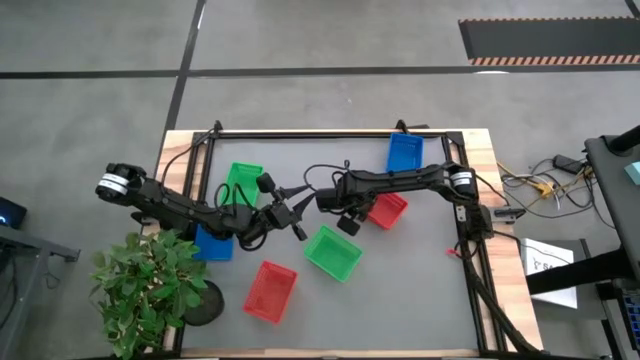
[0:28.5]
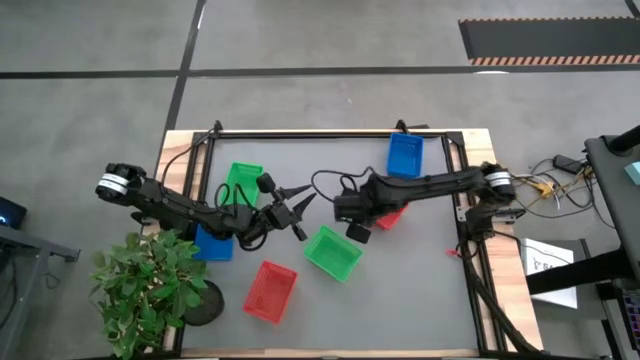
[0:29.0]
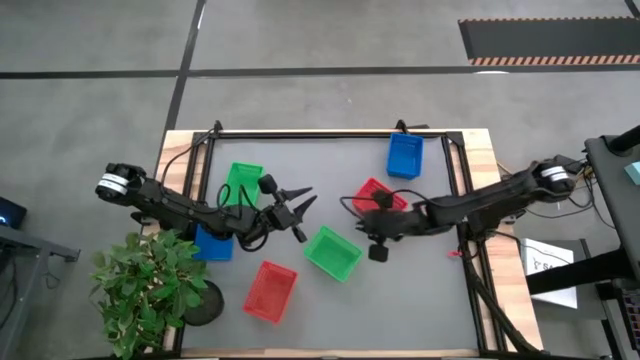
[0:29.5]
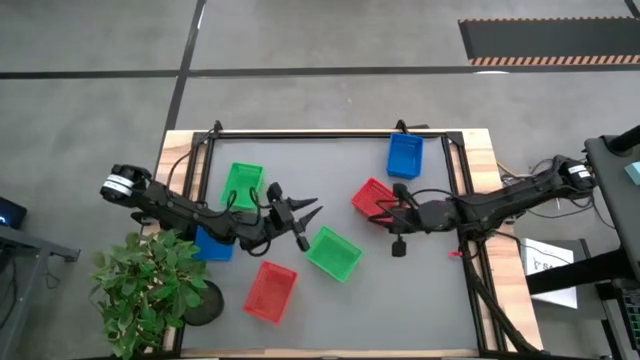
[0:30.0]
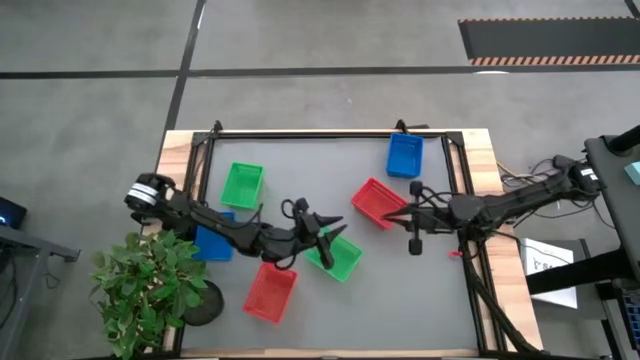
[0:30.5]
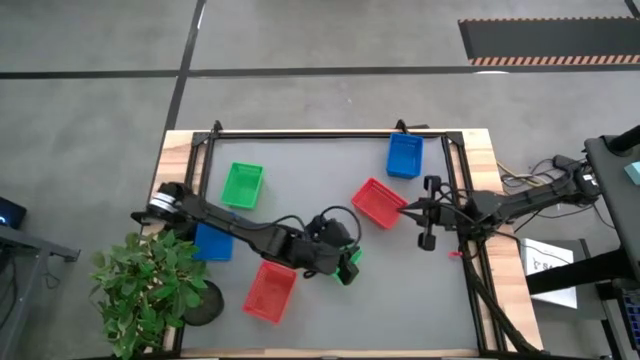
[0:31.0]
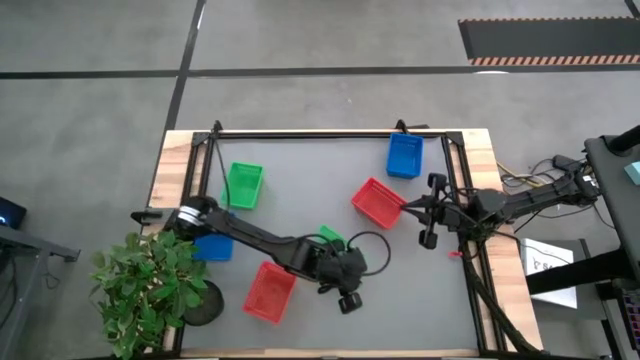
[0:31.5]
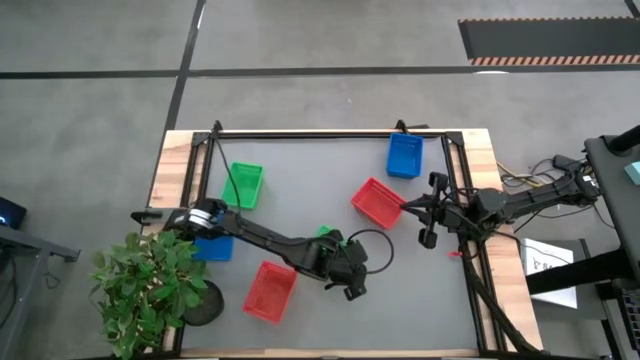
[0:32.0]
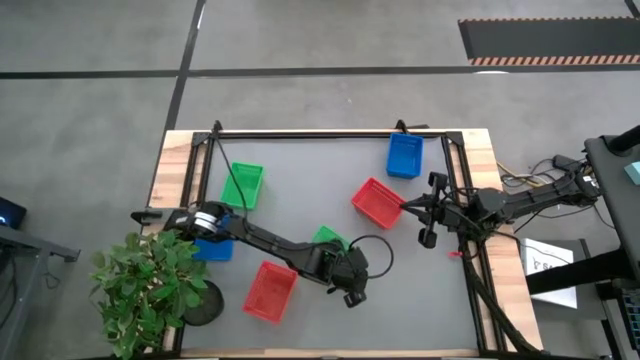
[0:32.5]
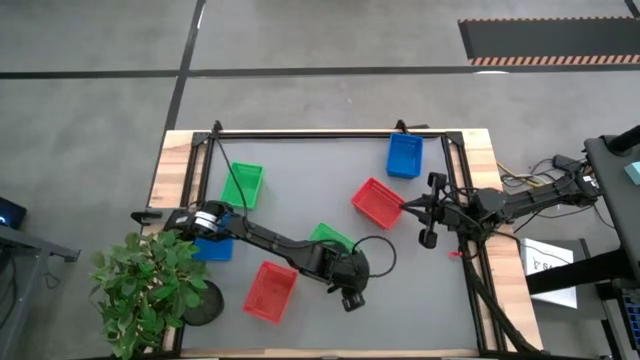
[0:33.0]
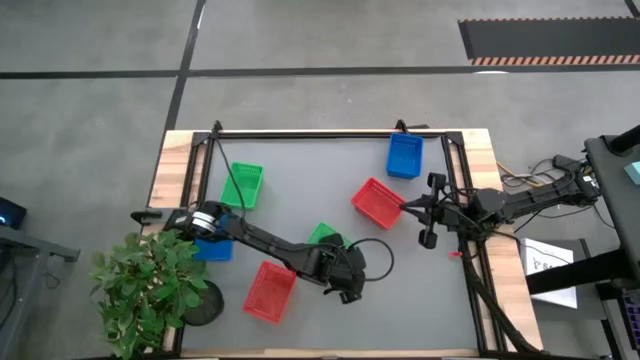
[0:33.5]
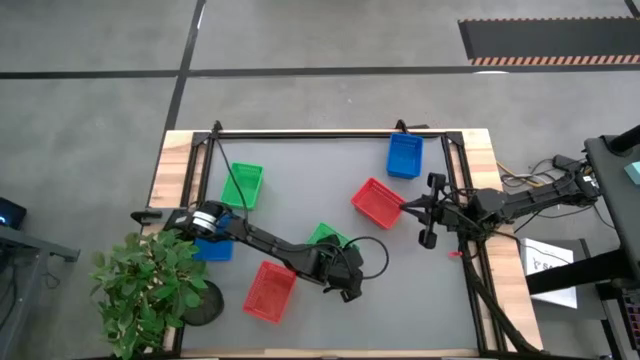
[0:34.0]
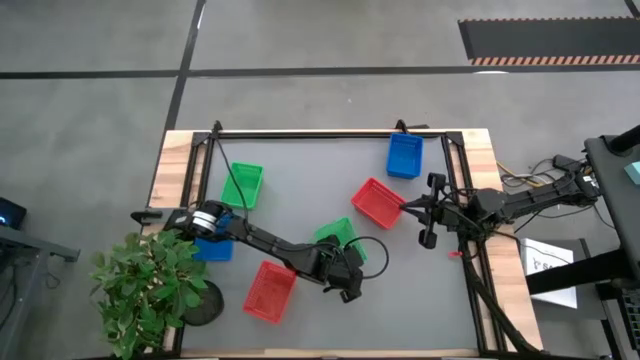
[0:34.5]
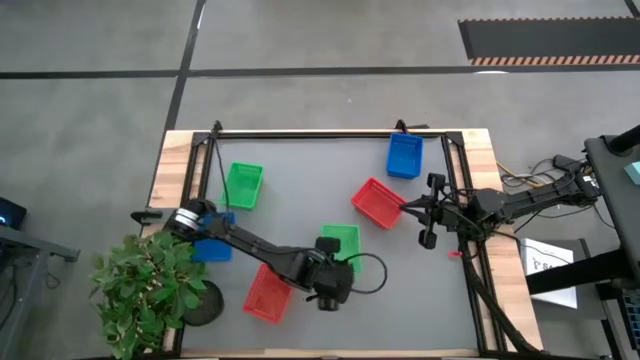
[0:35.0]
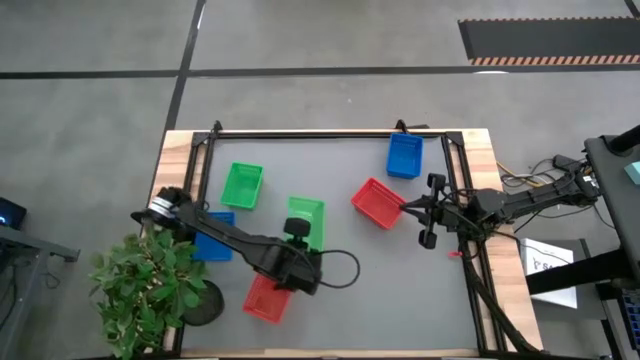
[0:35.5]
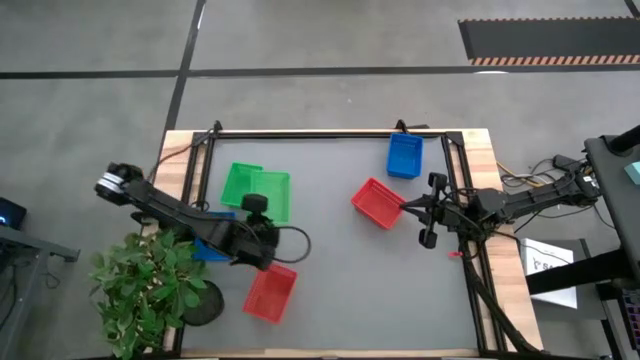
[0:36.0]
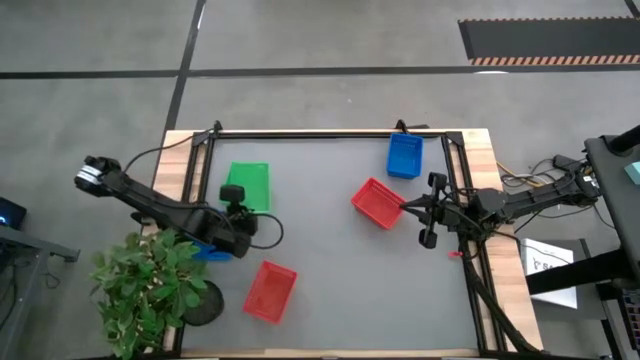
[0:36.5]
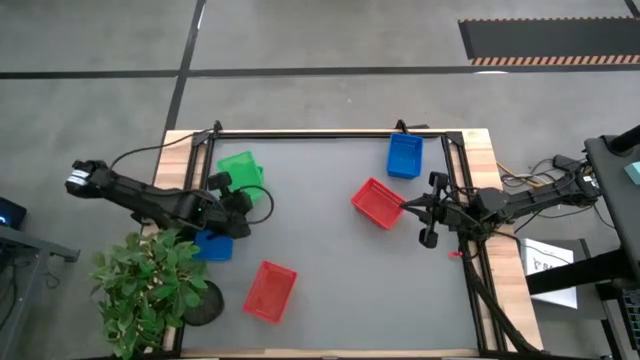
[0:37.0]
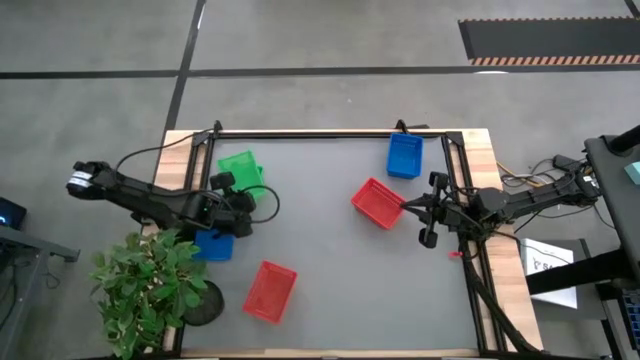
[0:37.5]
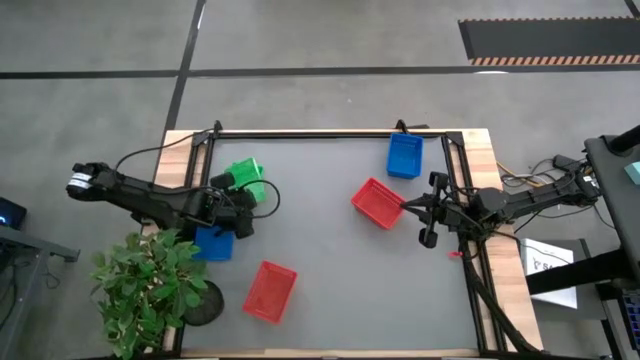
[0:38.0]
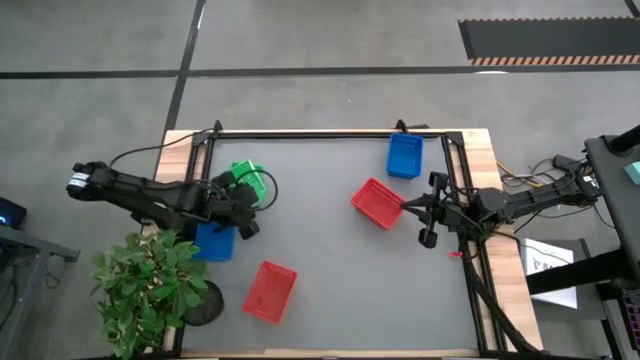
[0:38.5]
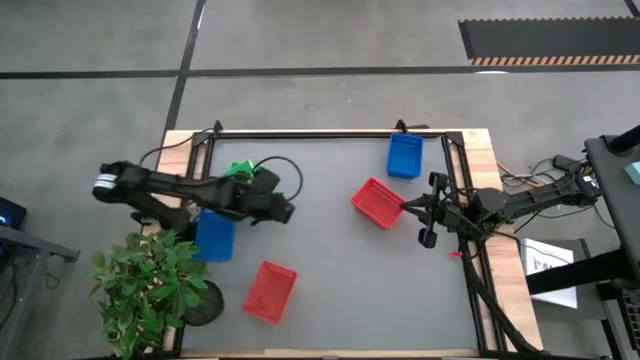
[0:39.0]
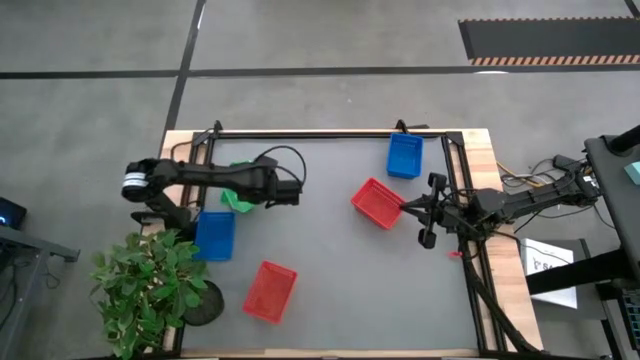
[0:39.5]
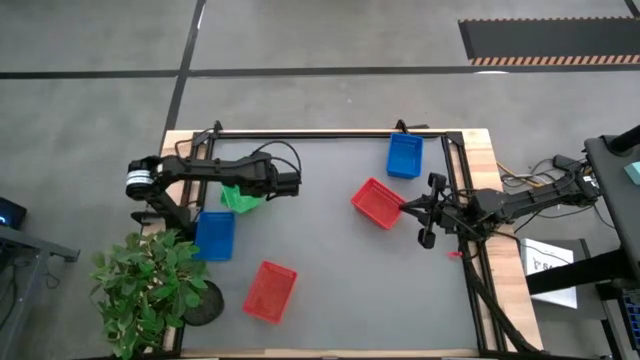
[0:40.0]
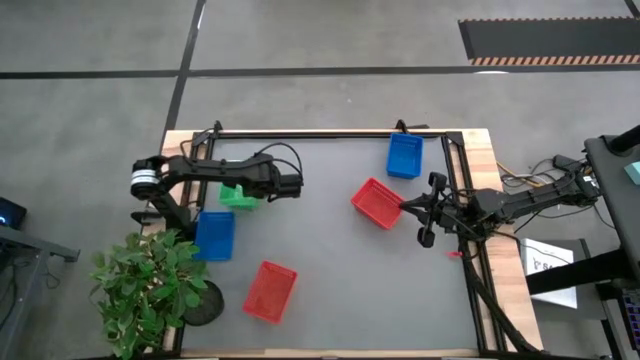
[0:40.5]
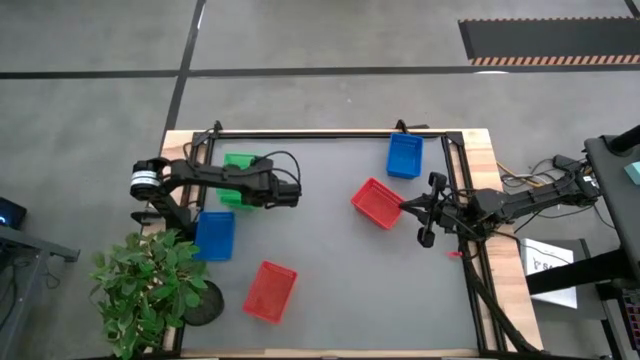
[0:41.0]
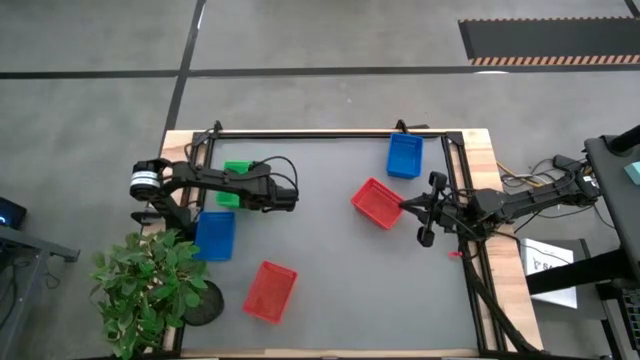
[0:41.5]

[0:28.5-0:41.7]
Stack the right green basket on the stacked green baskets

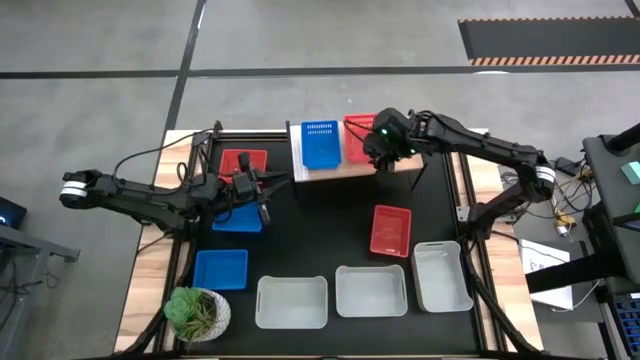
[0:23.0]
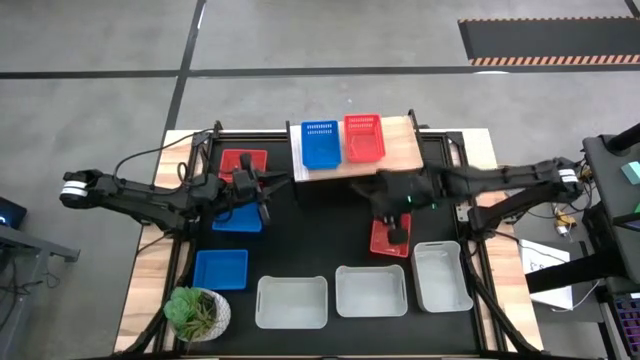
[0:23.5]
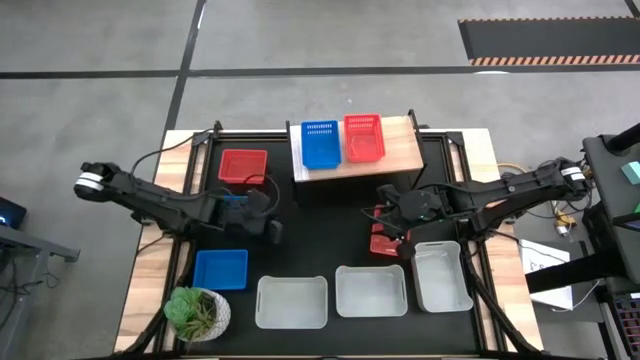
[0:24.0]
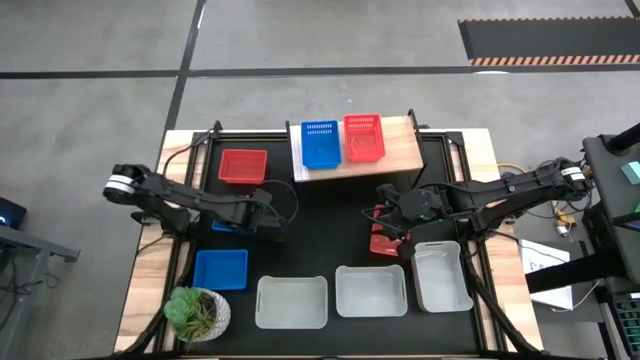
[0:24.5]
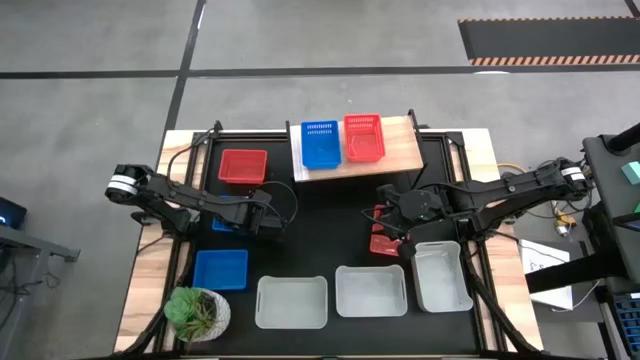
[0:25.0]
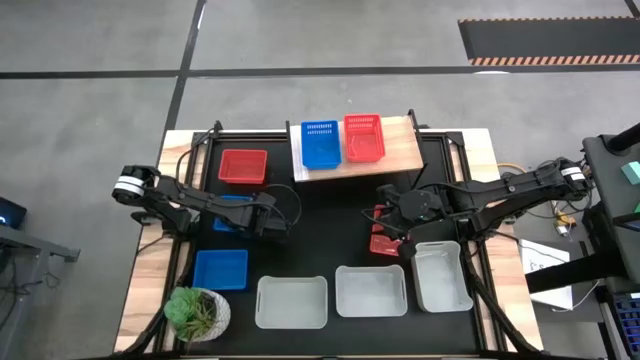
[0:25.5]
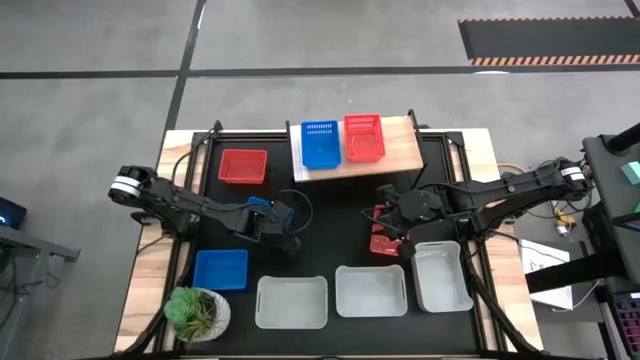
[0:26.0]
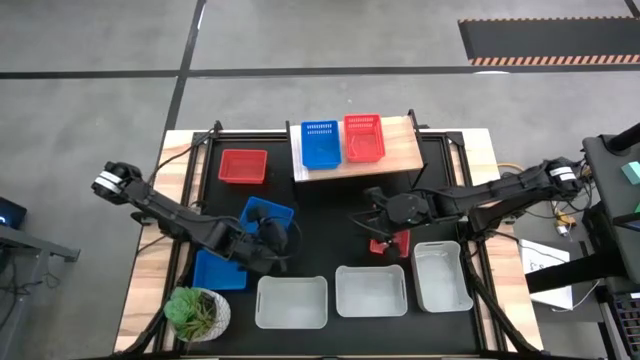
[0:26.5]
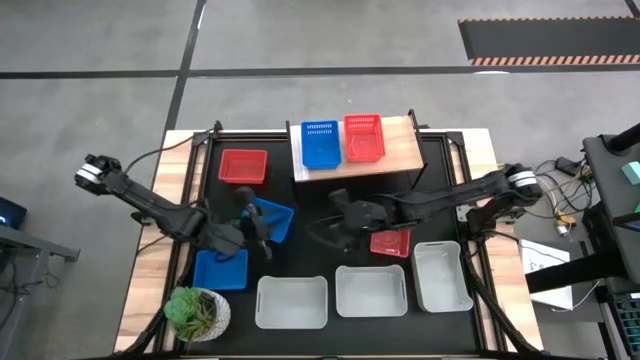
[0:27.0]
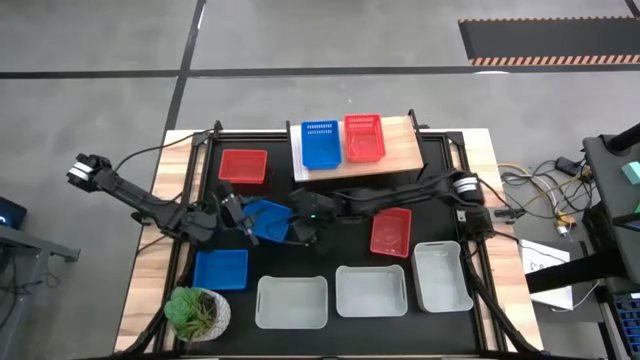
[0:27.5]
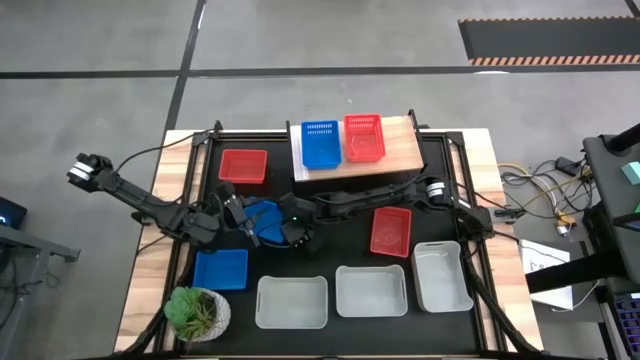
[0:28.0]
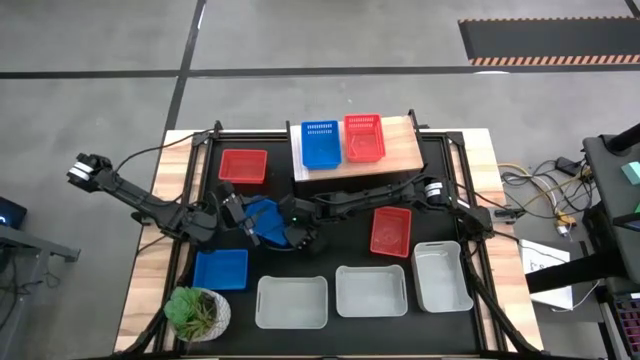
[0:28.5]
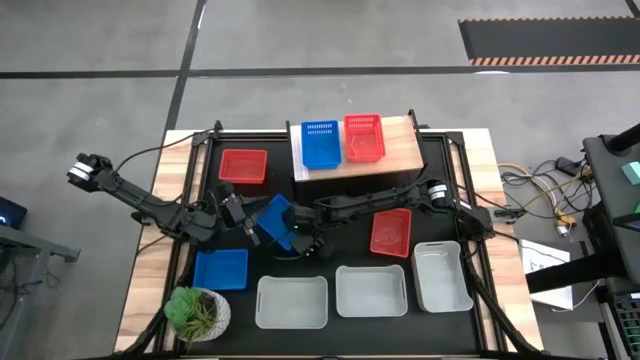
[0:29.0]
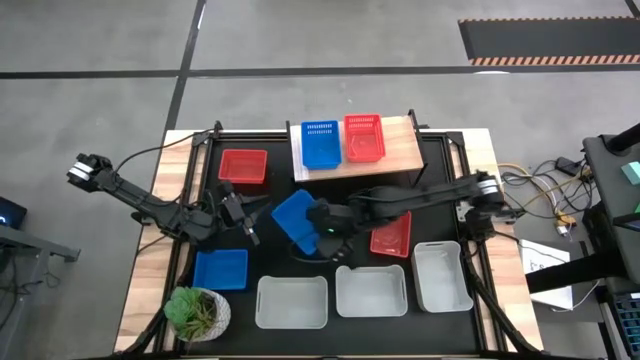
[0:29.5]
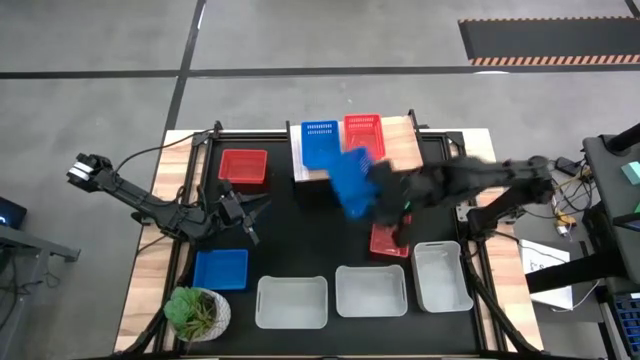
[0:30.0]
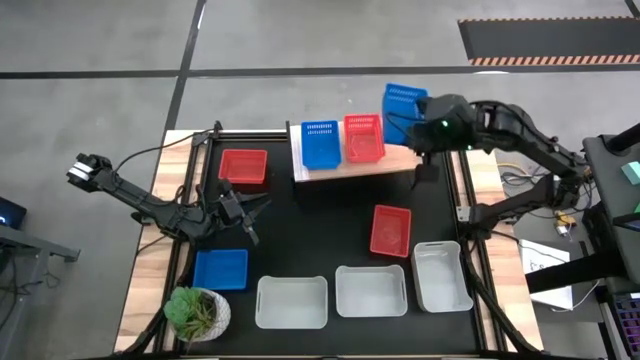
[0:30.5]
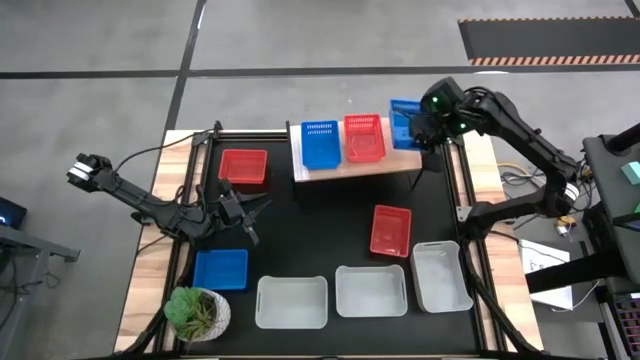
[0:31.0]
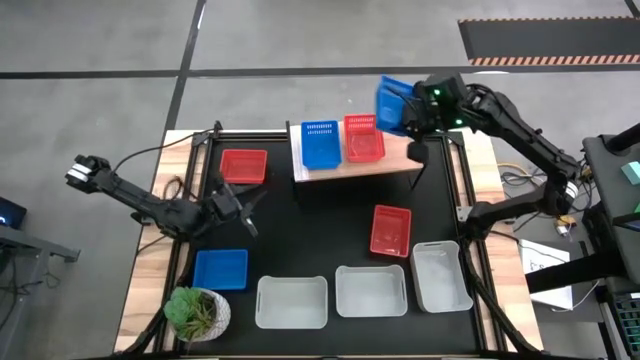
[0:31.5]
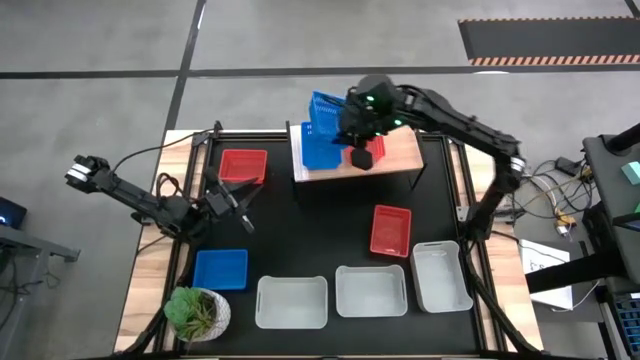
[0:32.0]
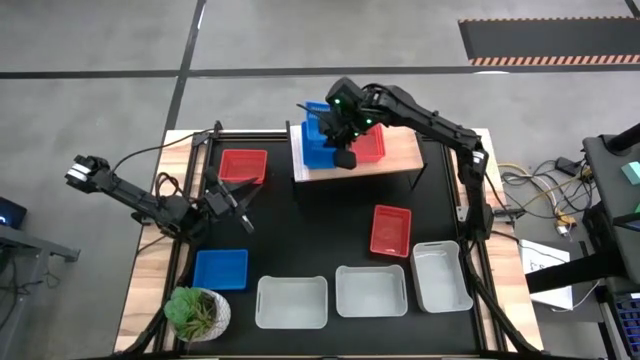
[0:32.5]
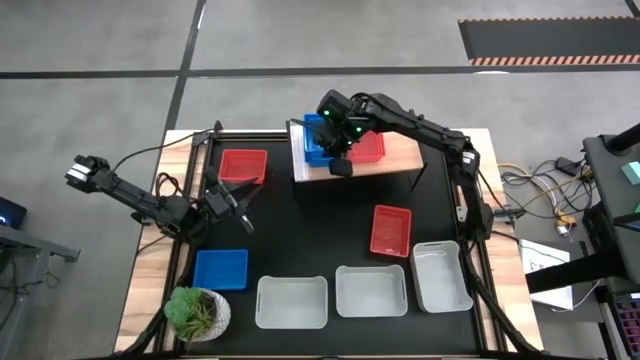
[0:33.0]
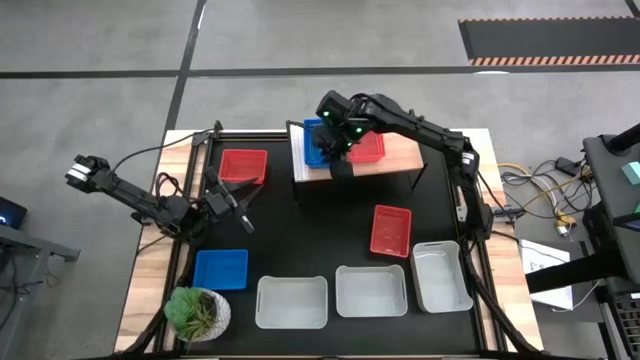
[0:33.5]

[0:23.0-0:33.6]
Stack the top blue basket on the blue basket on the shelf
